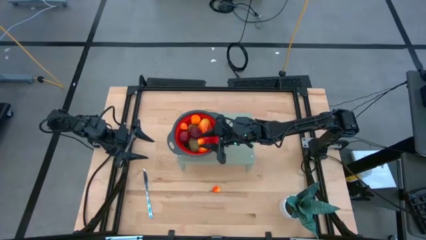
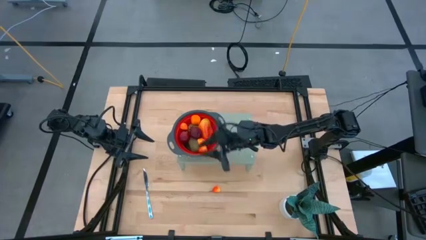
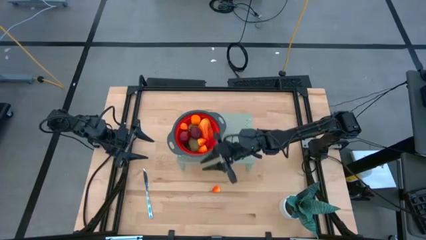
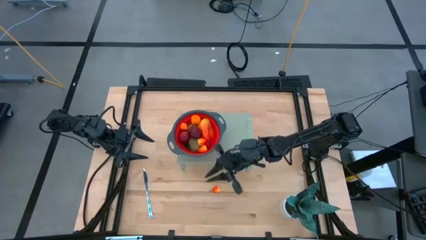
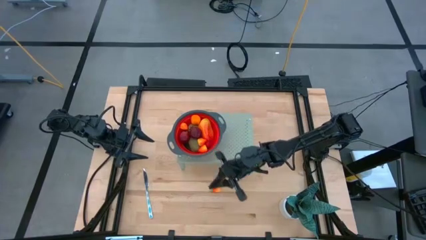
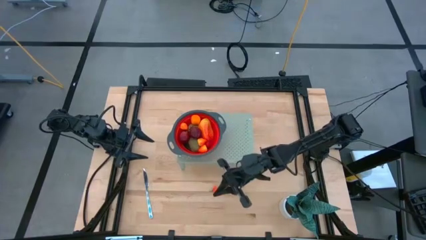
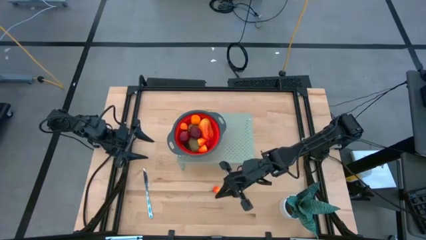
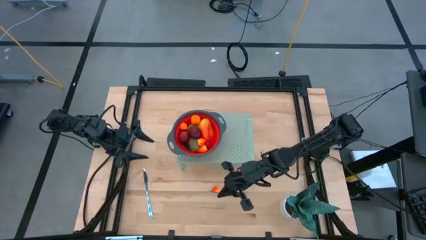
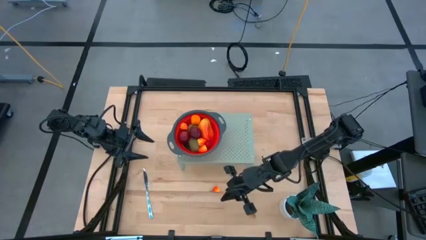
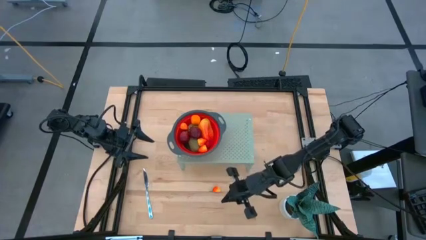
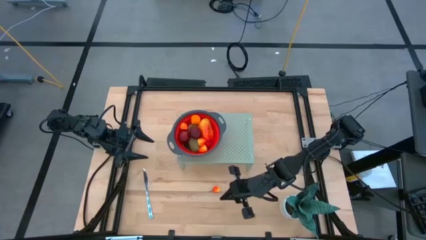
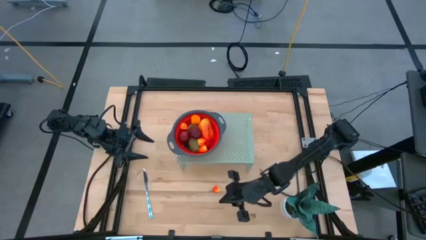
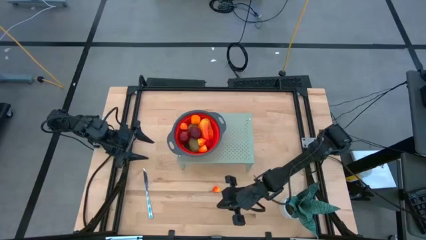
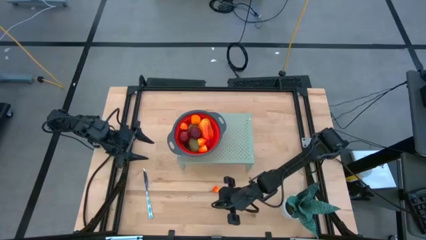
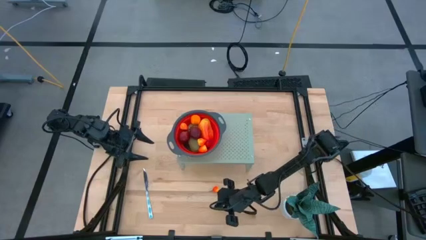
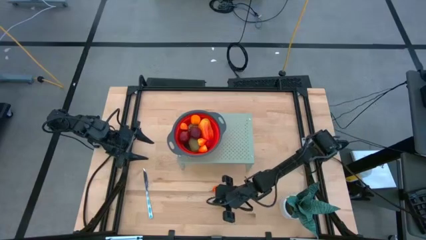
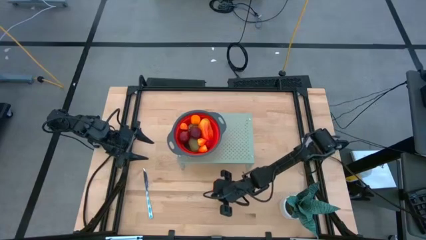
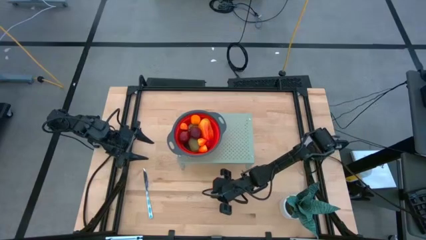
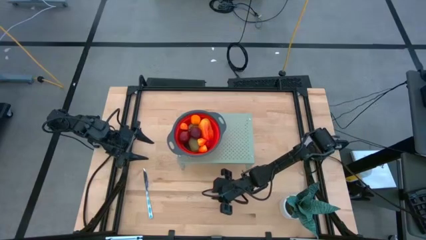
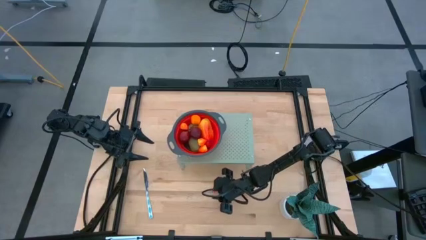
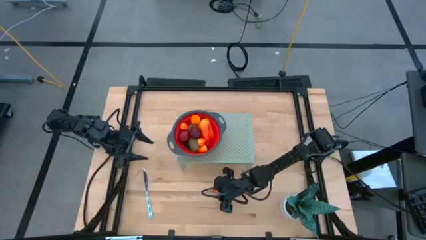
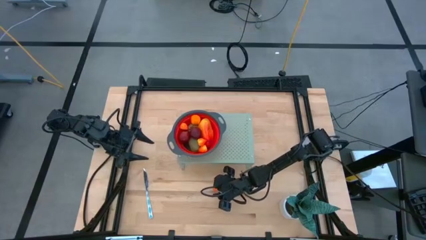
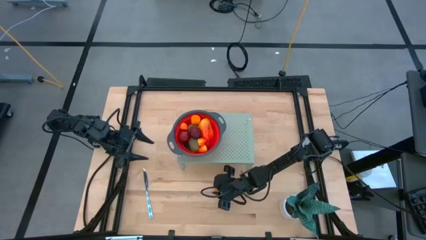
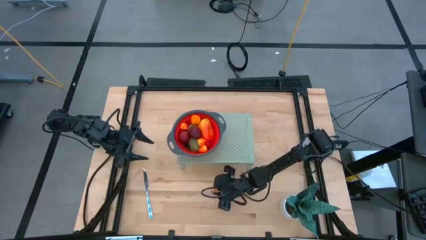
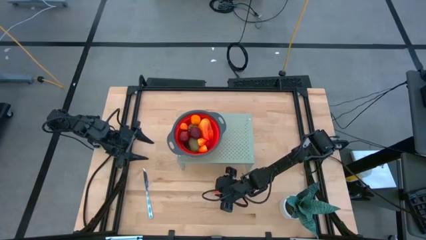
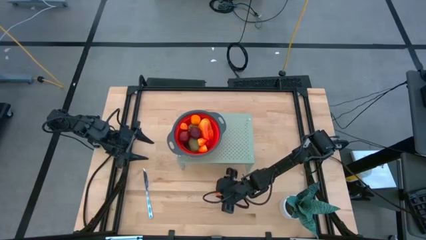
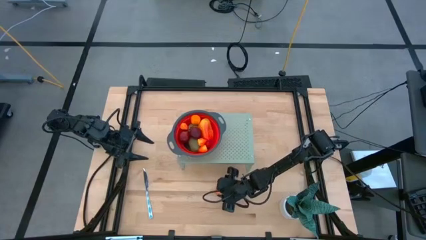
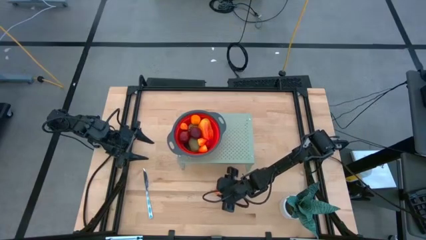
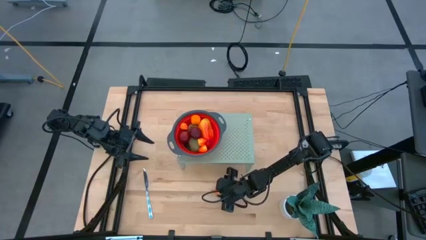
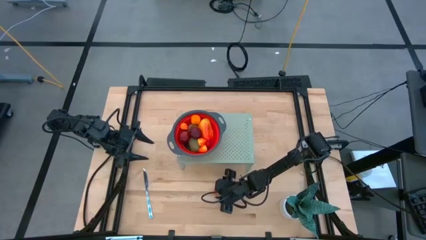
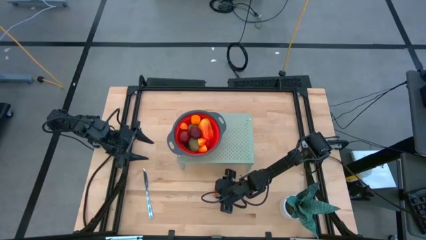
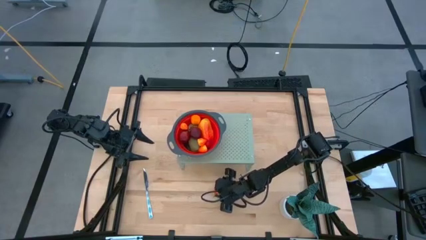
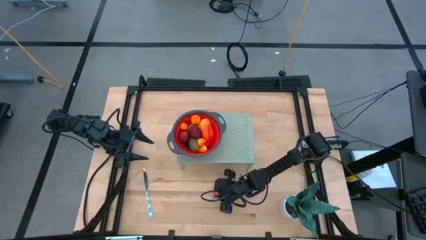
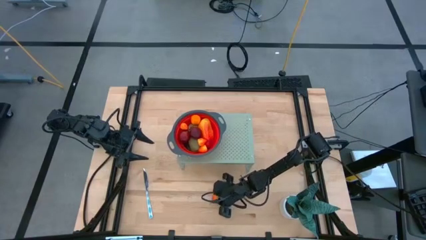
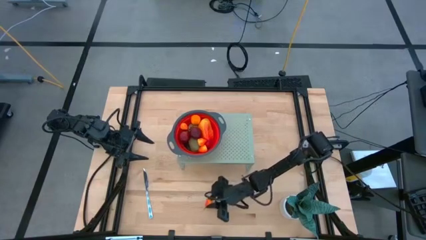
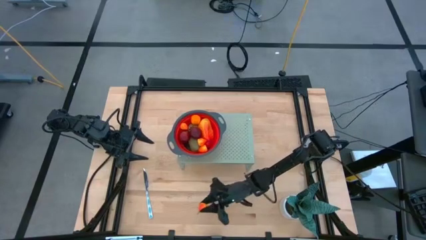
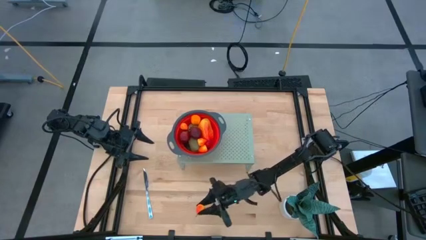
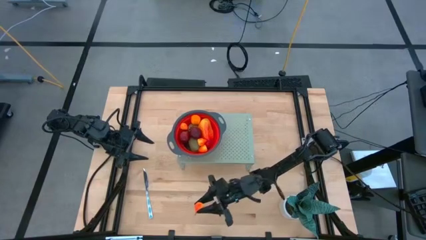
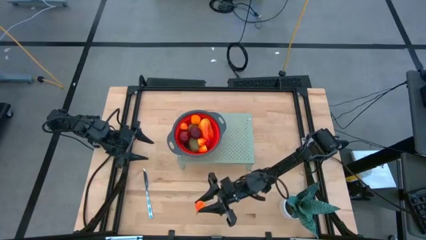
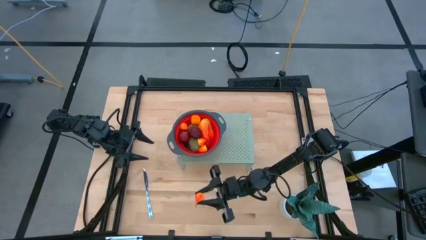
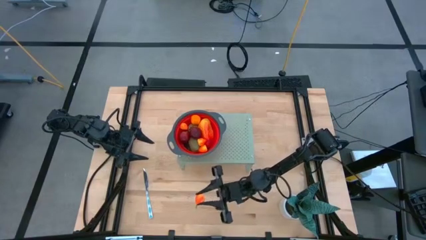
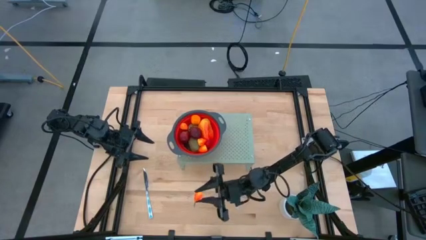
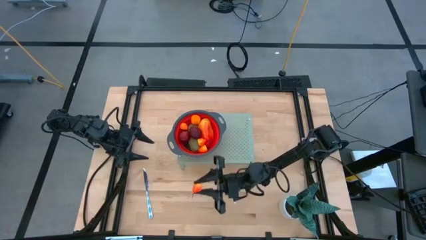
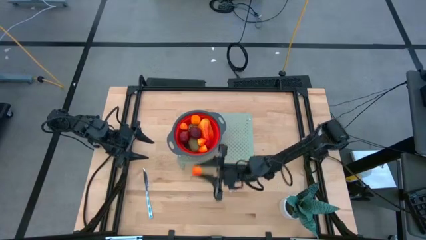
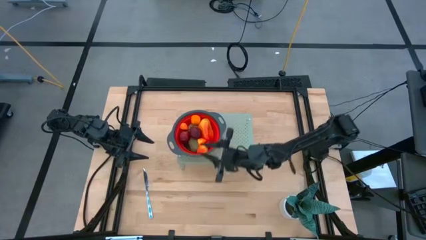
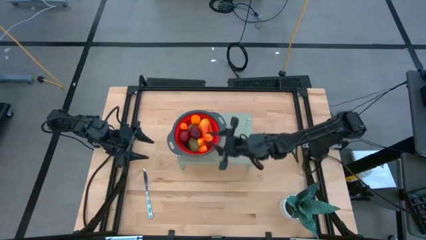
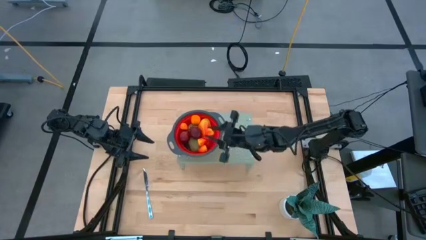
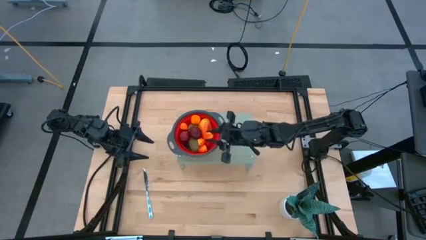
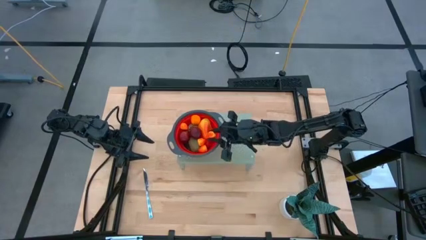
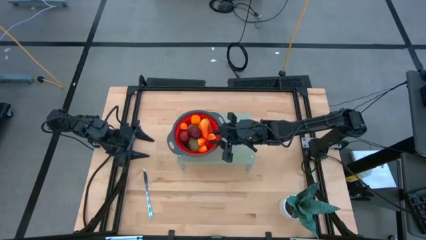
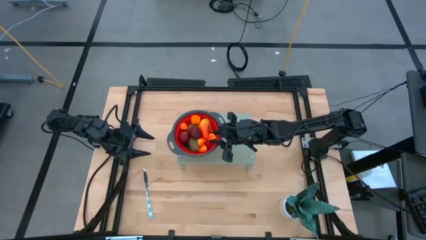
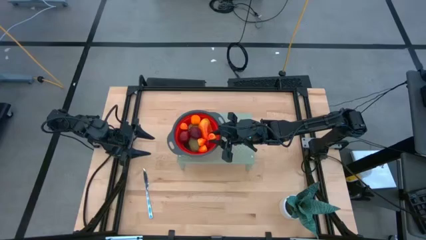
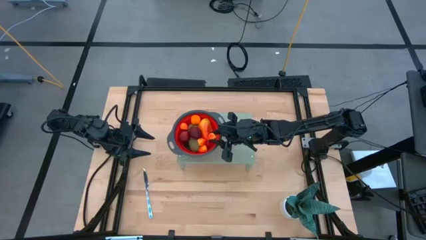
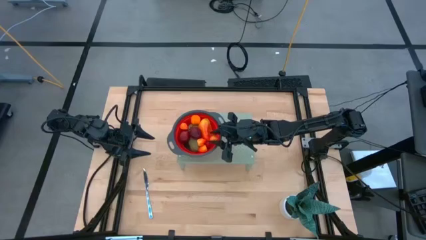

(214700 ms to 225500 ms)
Task: Pick & Place Fruit
Put the peach fruit into the strainer

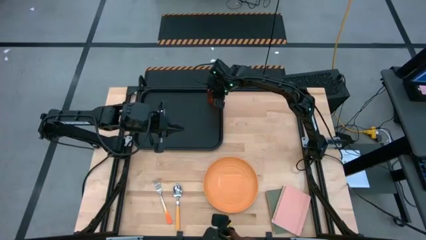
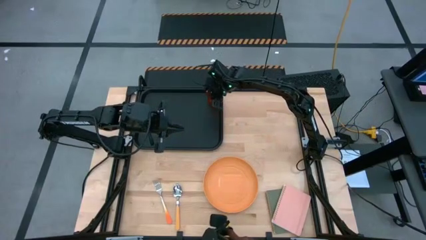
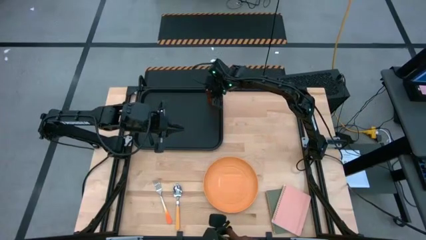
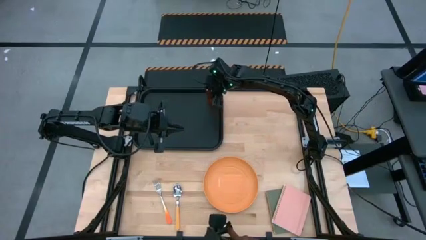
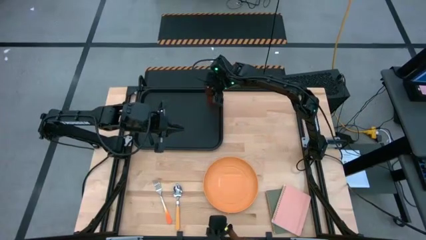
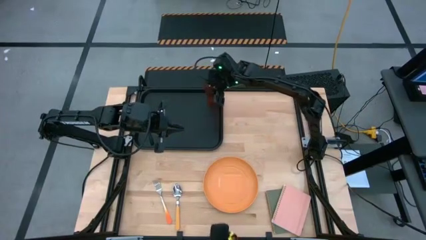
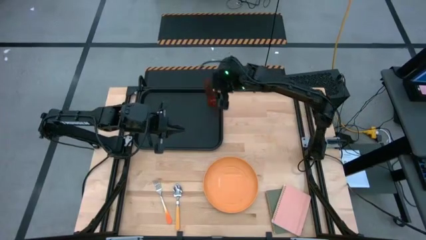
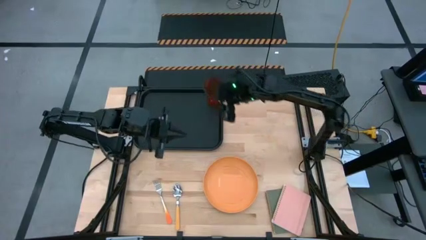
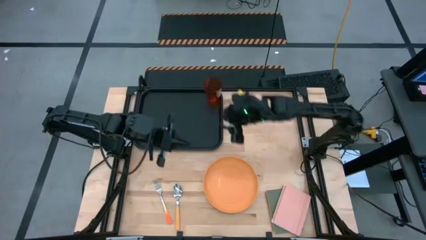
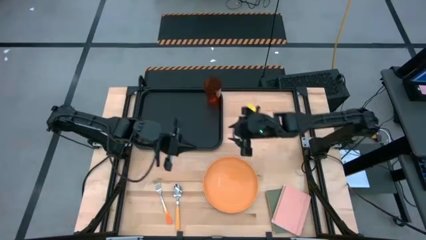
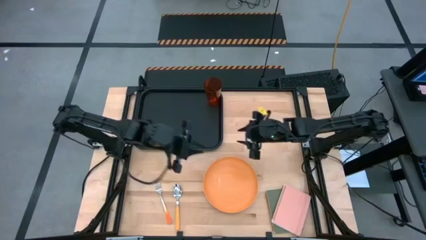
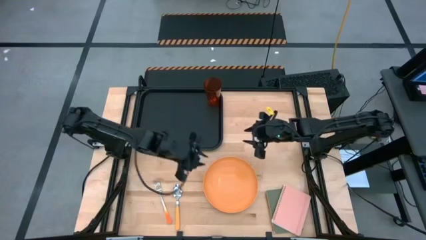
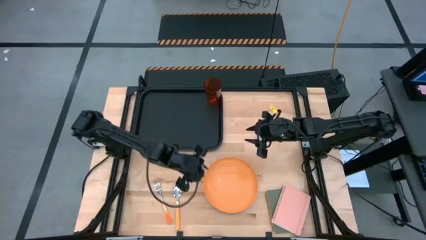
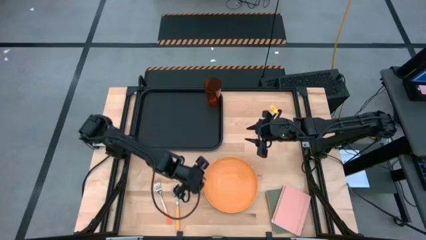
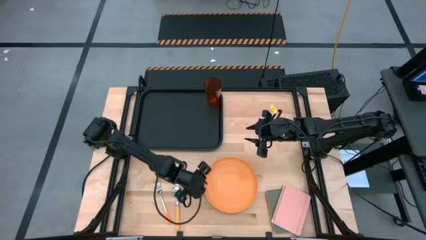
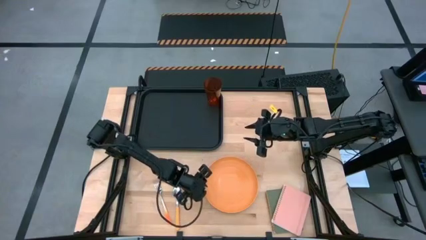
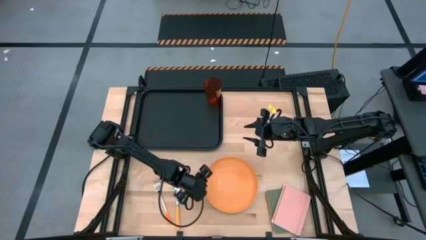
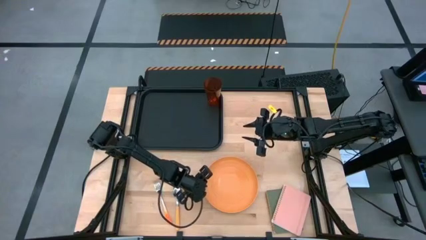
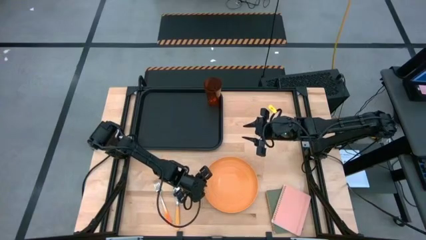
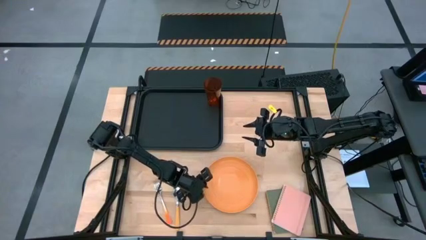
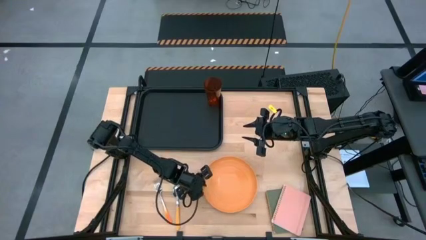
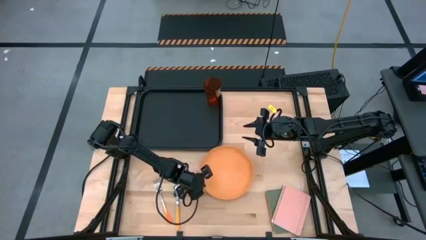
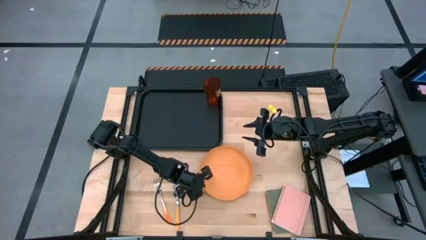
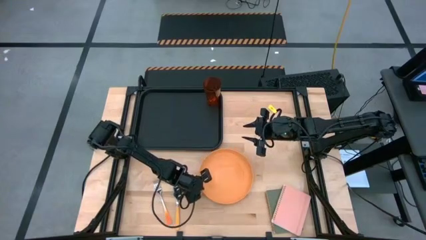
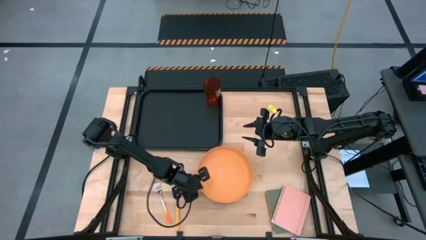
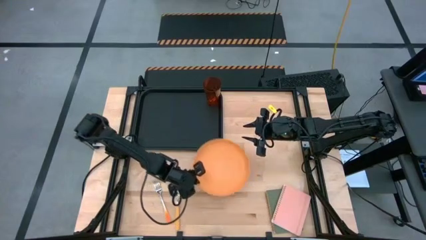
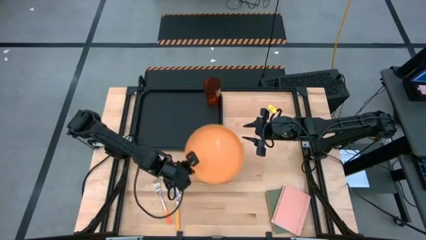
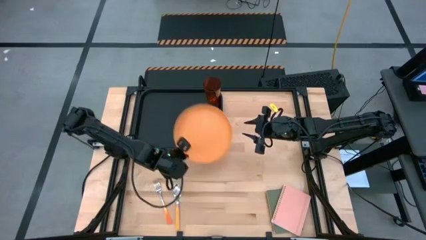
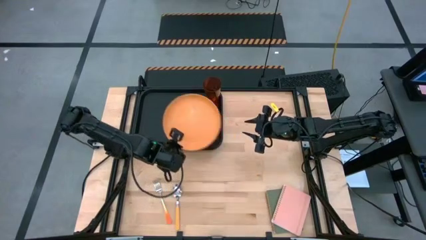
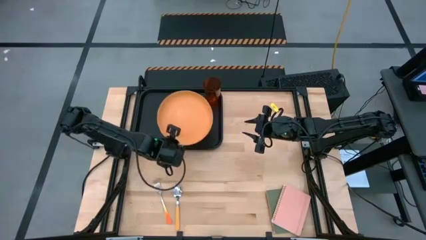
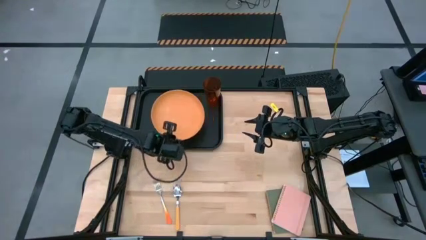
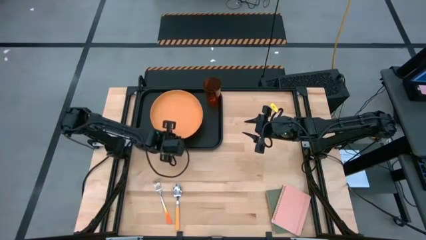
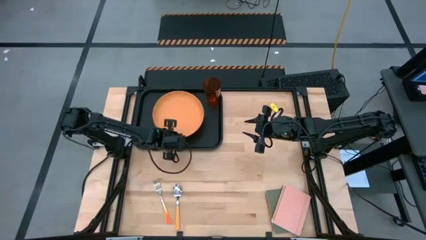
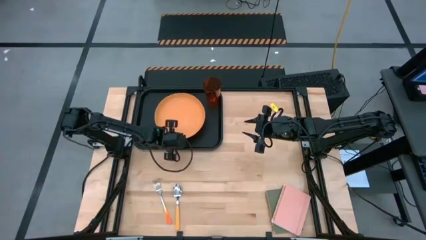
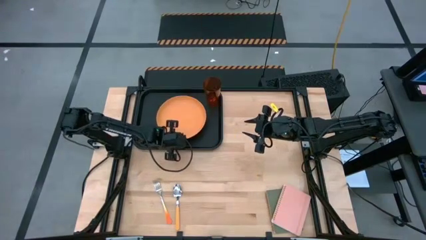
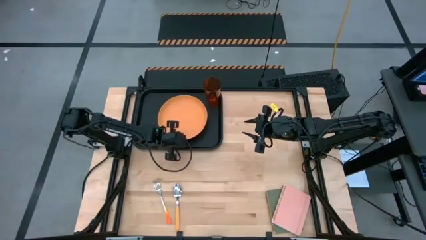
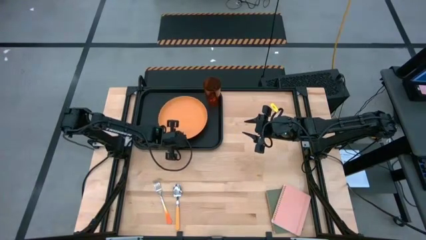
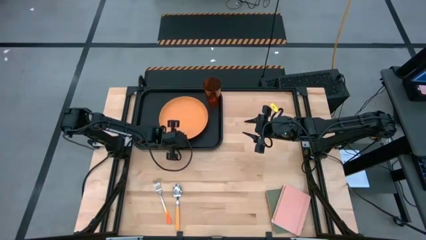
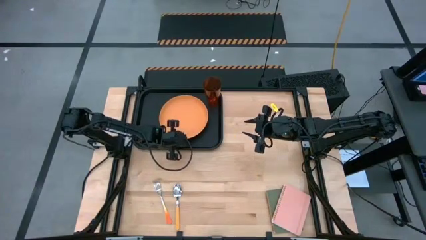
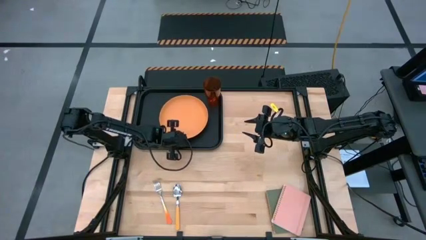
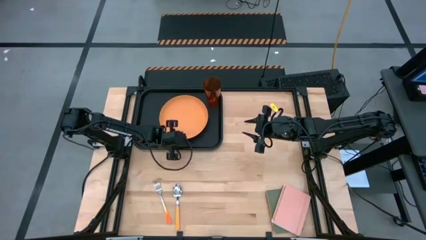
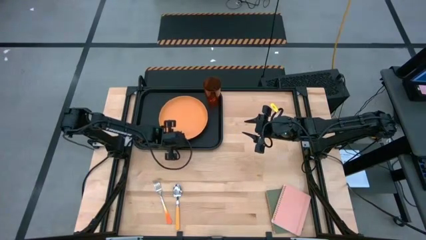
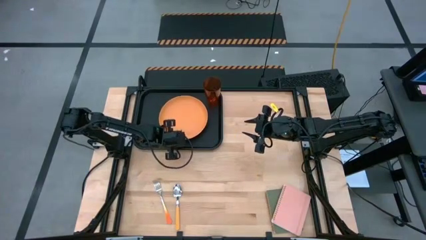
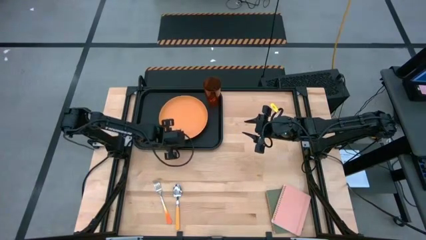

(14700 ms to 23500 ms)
Task: Pick and place plate/cup/fork/spoon on tray
Put the orange plate on the black serving tray to the bottom left of the orange cup
